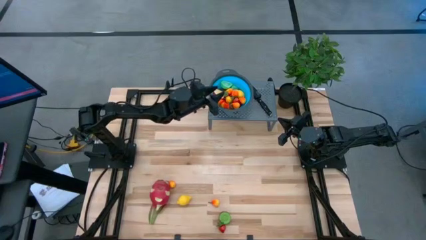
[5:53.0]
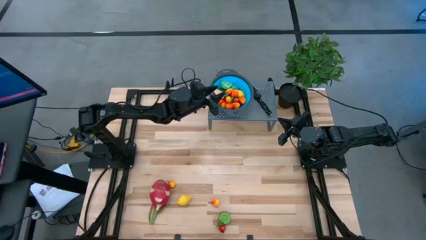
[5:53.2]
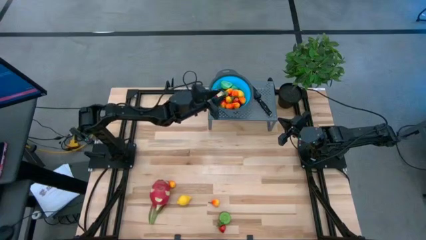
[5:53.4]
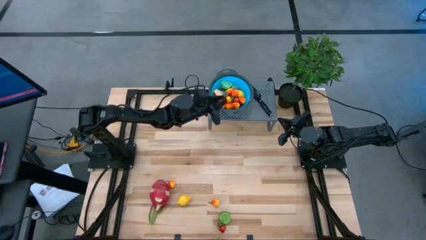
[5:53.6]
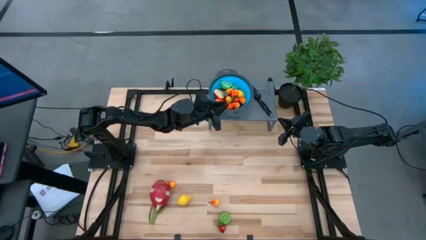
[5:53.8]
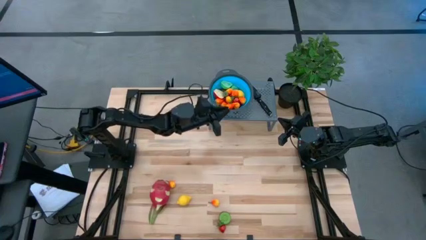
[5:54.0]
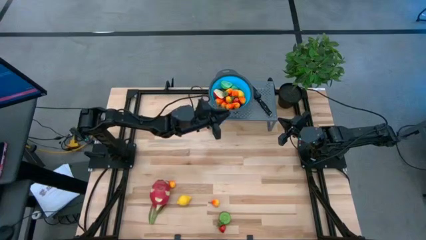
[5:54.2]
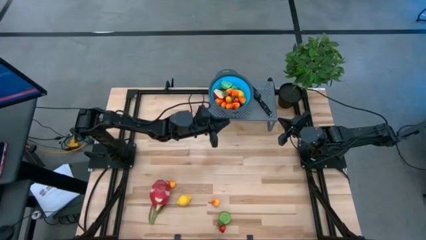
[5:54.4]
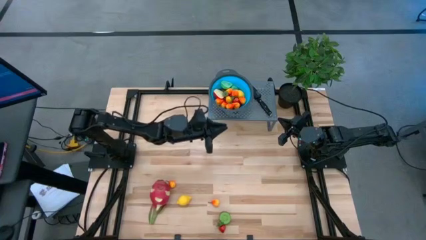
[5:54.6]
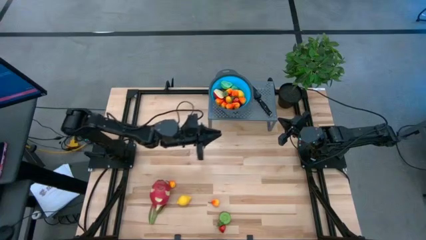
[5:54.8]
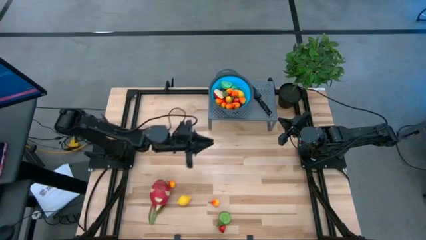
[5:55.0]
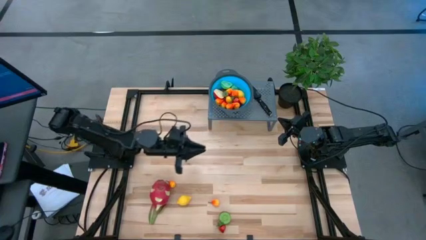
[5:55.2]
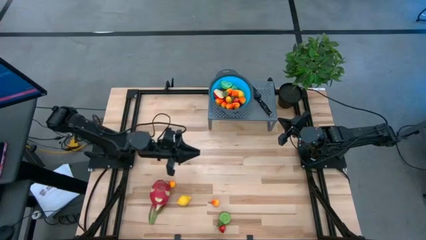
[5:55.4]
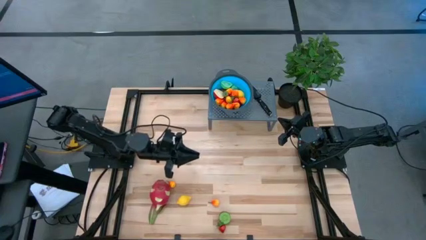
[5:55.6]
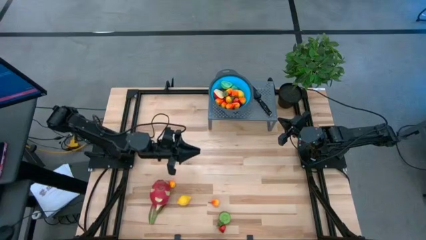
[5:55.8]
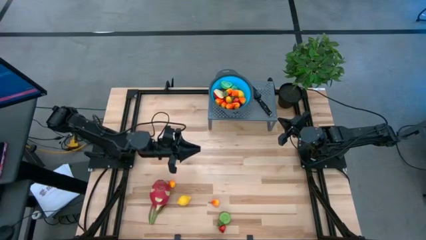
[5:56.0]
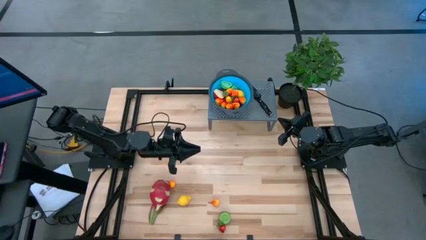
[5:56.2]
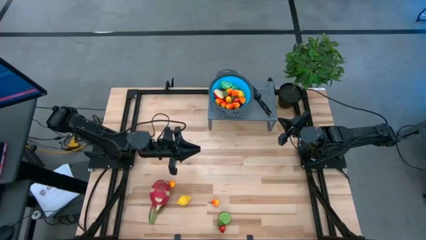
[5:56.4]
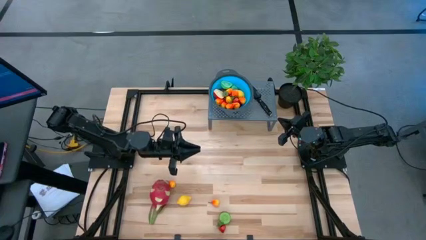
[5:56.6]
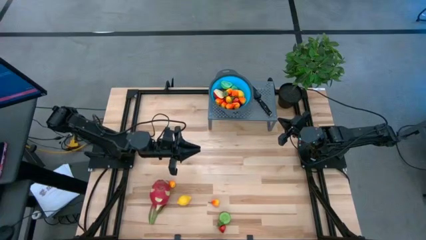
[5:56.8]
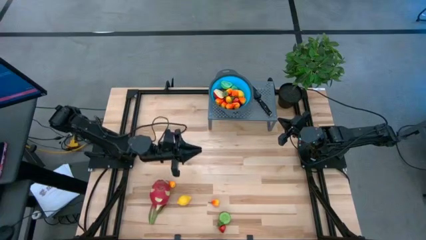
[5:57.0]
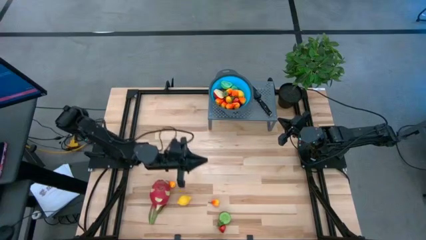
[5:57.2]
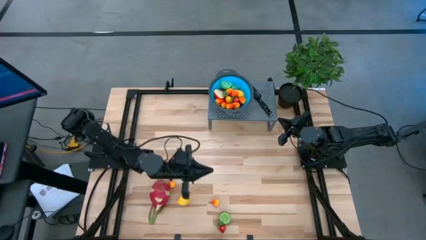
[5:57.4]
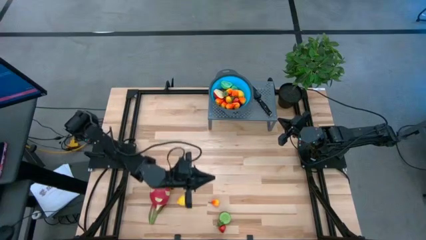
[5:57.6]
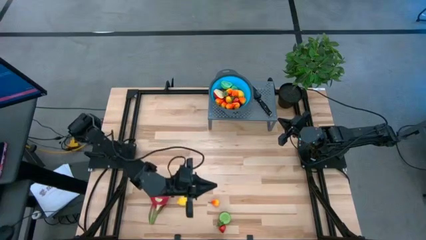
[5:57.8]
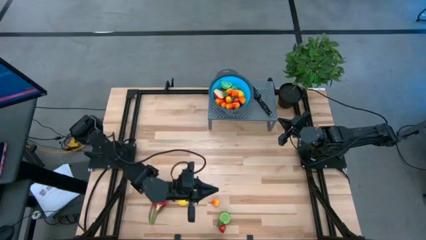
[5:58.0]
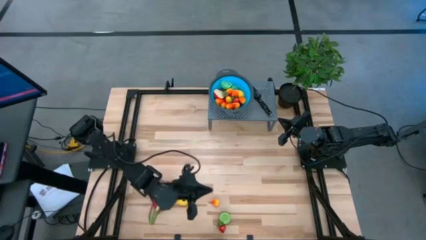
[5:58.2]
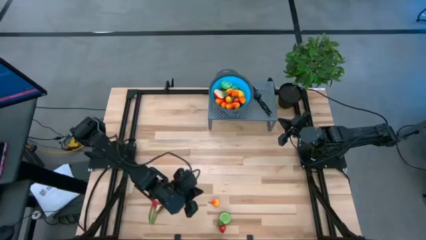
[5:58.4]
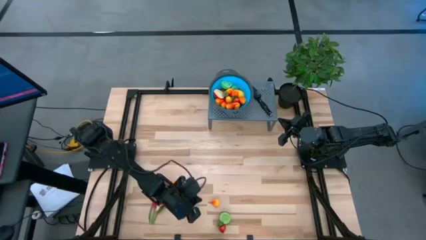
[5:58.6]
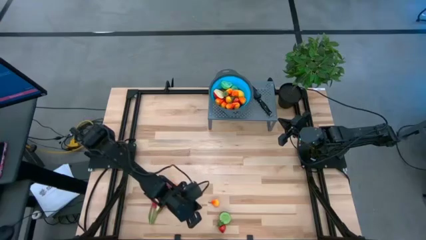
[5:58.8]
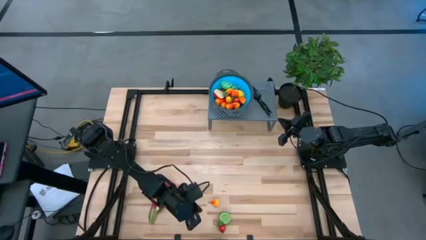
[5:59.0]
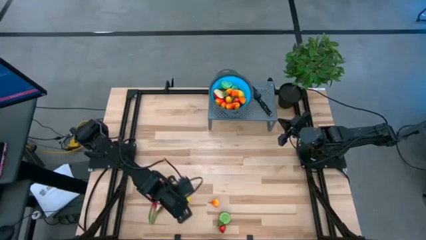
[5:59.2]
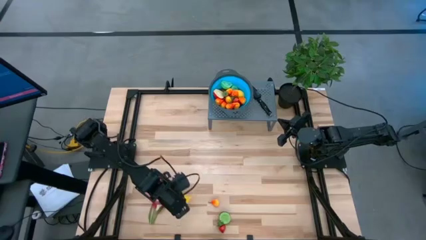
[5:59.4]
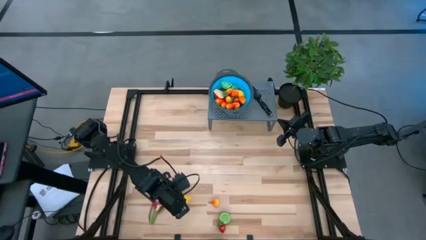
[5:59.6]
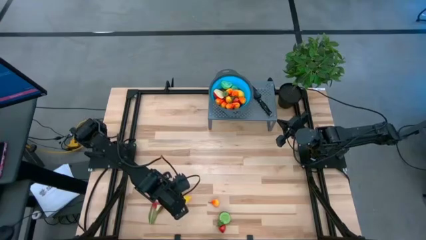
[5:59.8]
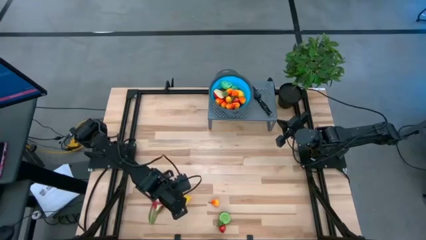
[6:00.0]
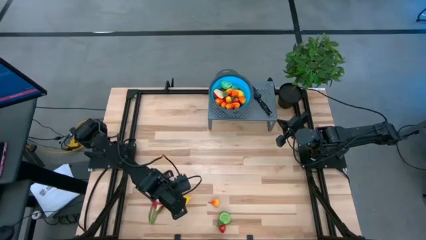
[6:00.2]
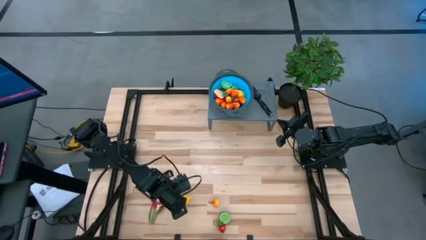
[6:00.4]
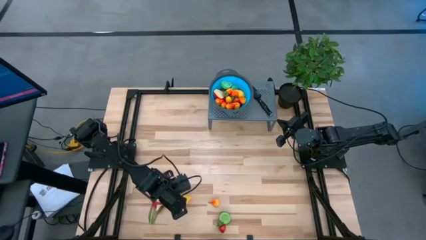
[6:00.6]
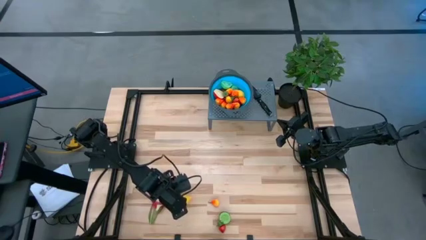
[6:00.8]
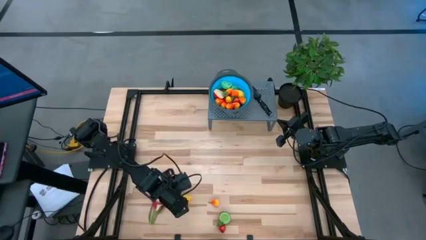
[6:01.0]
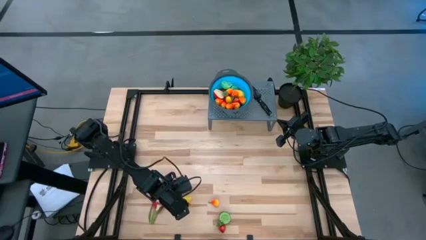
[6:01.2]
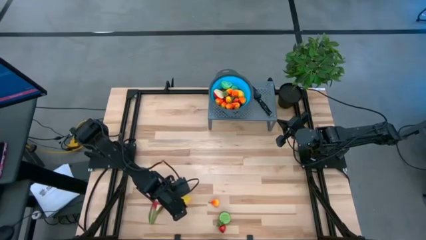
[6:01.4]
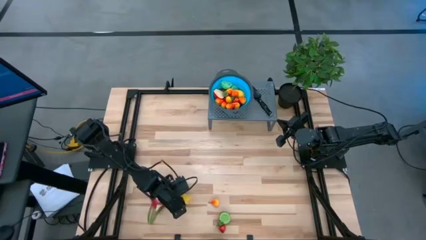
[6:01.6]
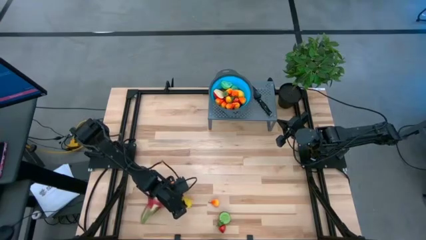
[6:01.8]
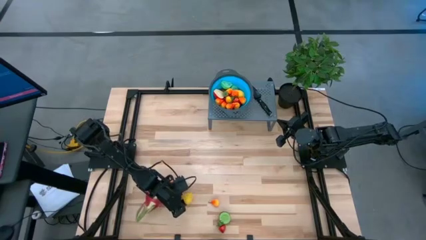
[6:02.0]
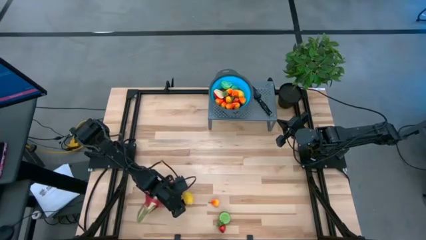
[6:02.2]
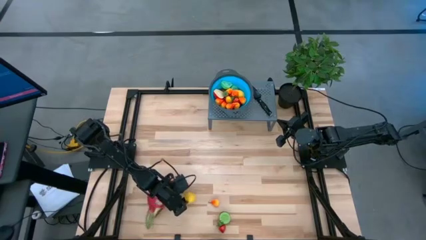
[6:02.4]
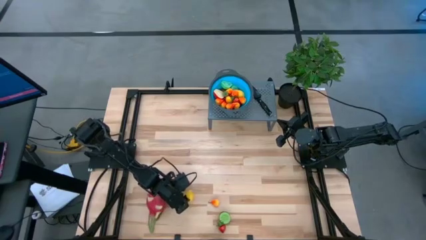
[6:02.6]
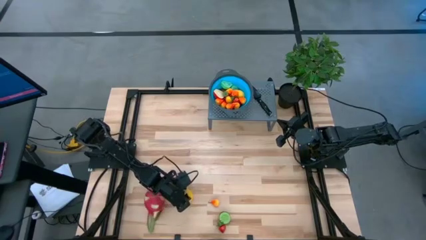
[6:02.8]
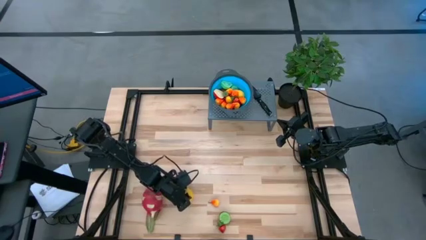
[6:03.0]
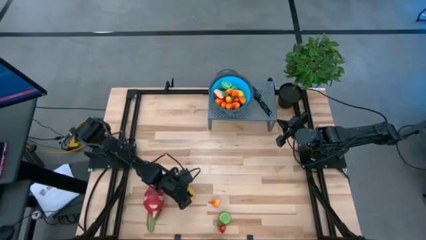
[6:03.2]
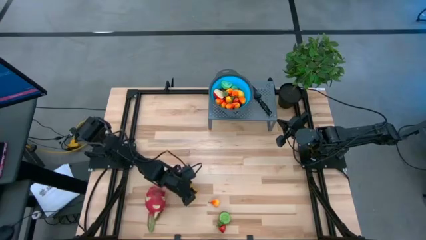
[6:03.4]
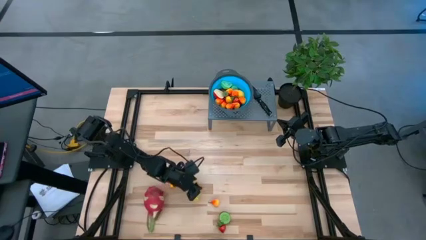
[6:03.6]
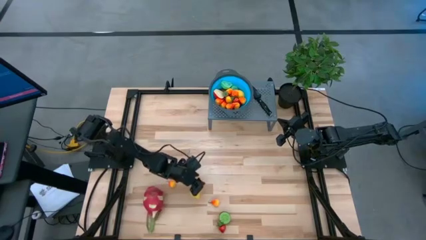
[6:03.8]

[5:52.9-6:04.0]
Task: Pick & Place Fruit
Put the lemon into the strainer bowl

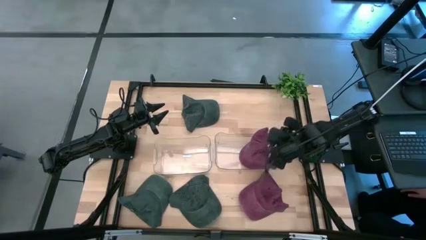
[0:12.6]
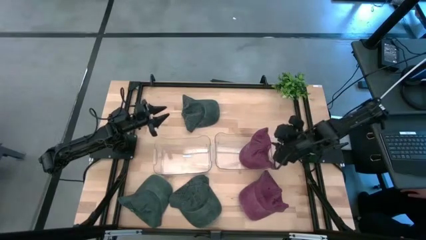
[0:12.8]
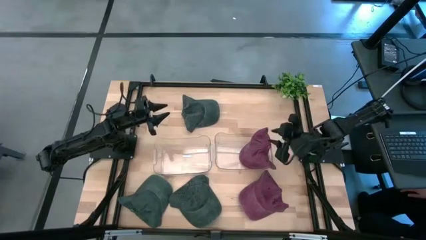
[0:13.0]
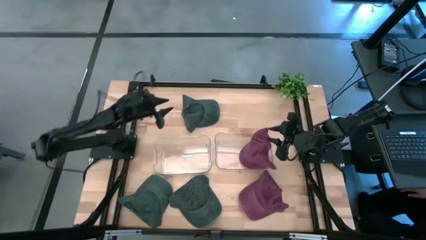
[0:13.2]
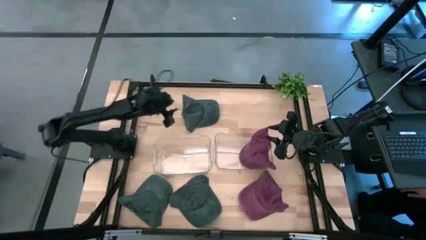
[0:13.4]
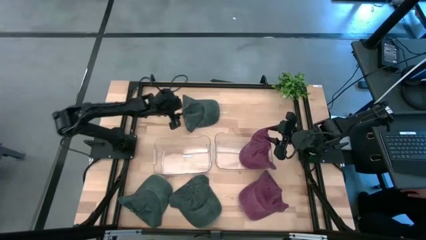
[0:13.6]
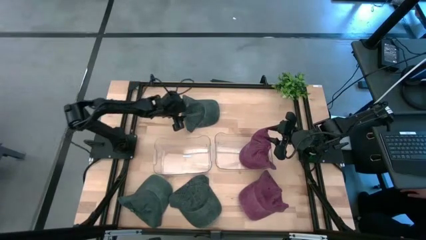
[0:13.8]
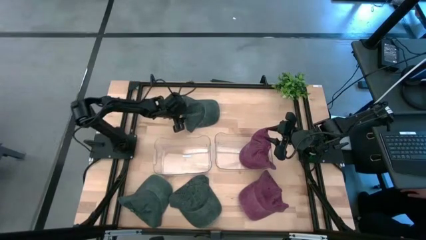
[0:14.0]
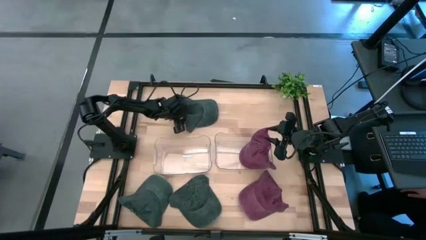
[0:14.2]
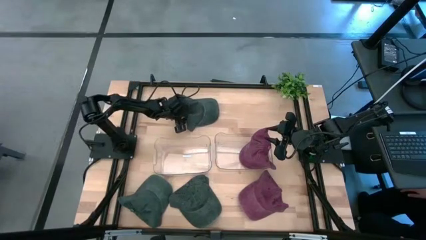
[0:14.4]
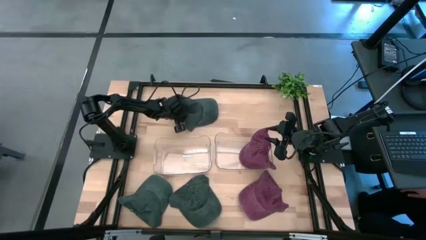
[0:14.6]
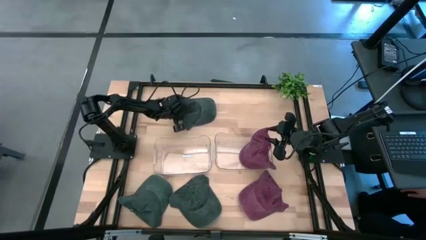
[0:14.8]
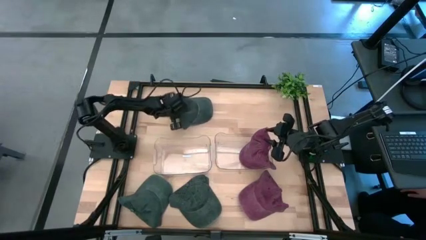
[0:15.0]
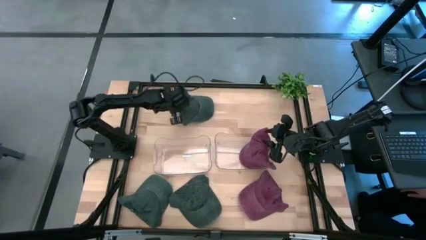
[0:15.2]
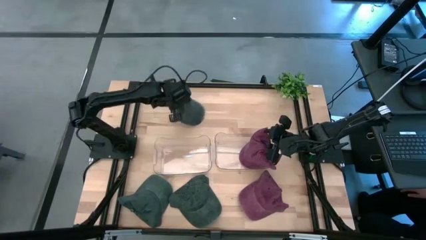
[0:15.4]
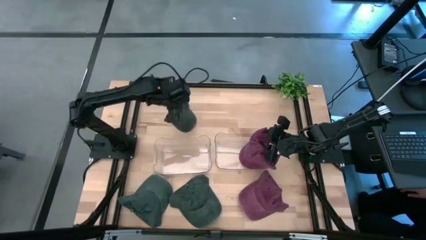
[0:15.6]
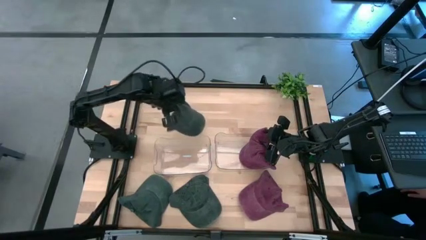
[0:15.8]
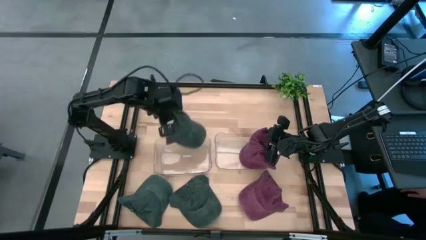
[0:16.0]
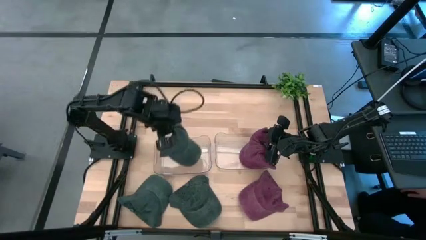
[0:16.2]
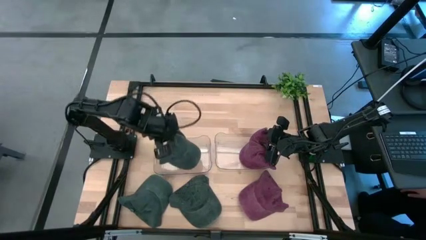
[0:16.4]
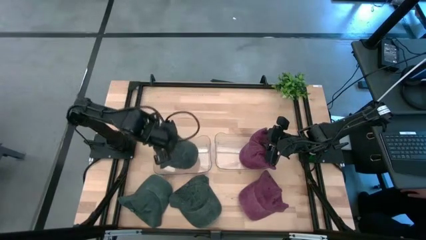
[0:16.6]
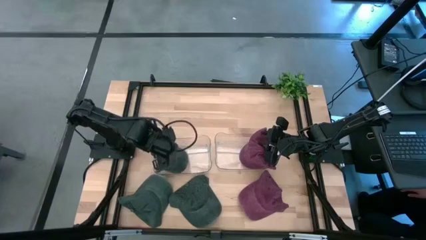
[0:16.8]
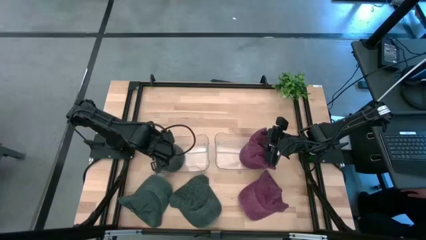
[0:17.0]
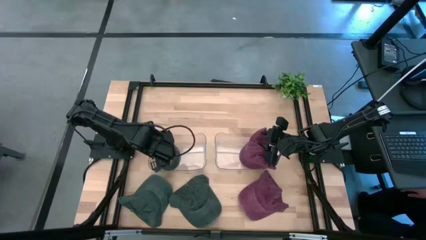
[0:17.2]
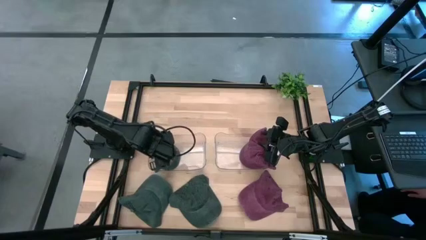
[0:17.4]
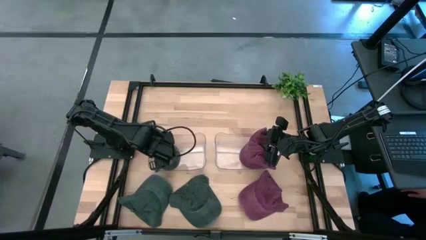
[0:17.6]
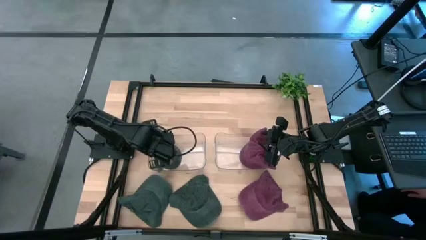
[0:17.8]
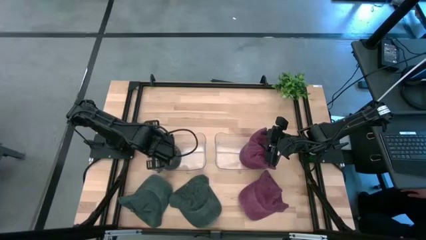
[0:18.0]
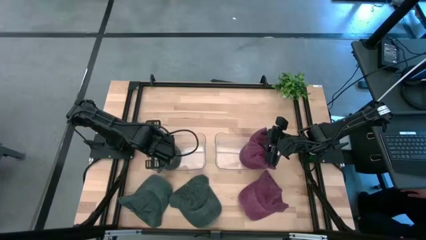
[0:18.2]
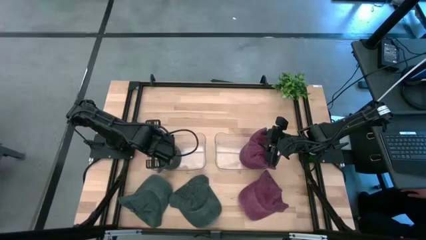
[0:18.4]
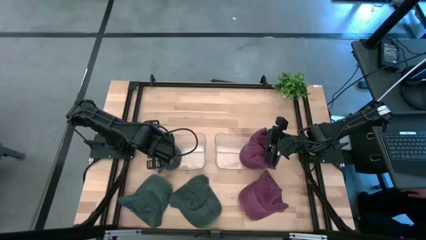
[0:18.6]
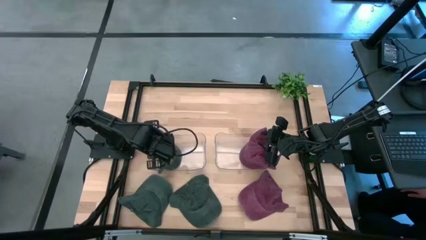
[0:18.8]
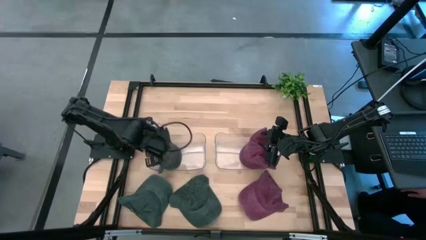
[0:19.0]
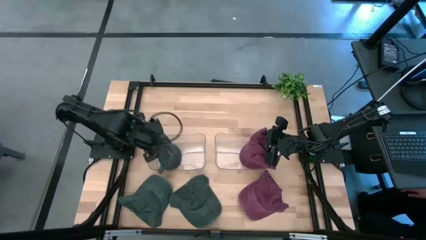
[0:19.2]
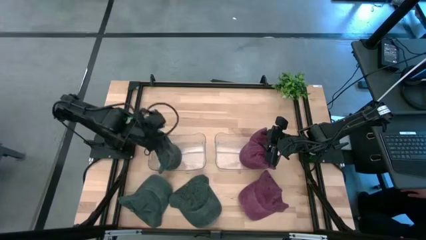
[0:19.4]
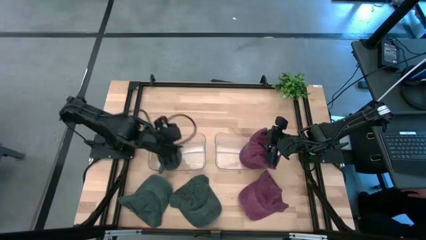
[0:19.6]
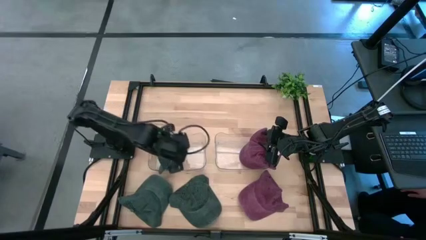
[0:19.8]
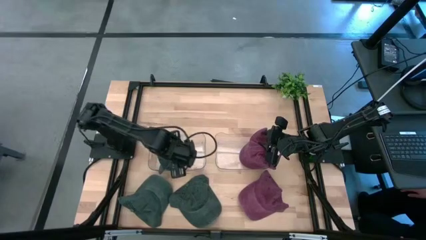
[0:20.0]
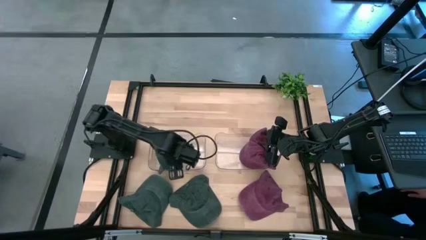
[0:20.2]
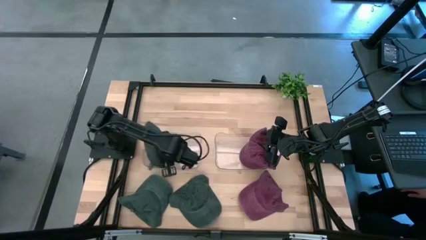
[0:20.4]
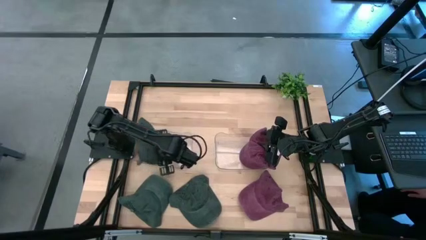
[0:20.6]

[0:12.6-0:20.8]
Task: Pick & Place hat
Put the top black cap into the left transparent bin
